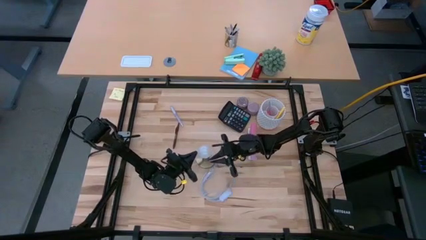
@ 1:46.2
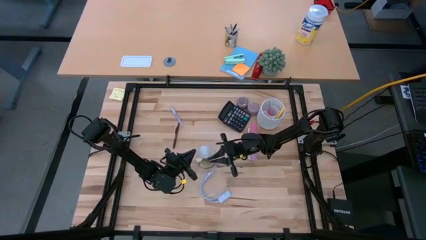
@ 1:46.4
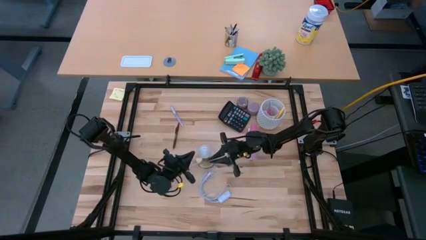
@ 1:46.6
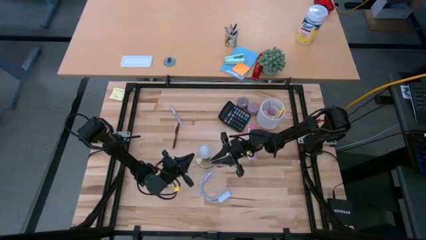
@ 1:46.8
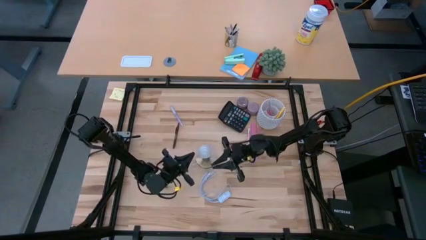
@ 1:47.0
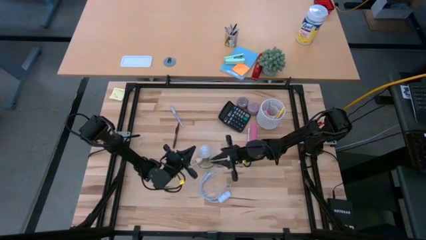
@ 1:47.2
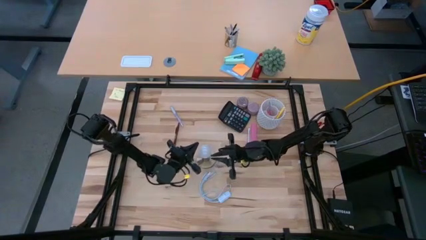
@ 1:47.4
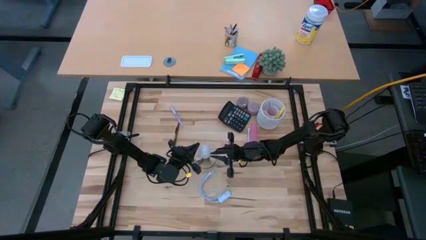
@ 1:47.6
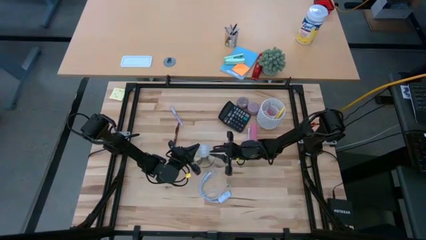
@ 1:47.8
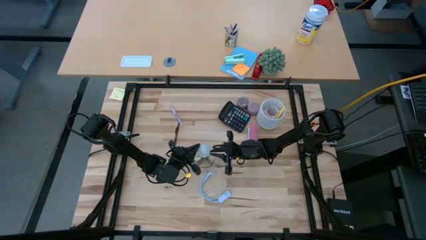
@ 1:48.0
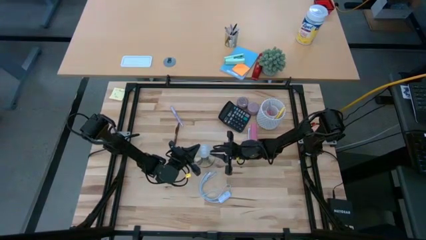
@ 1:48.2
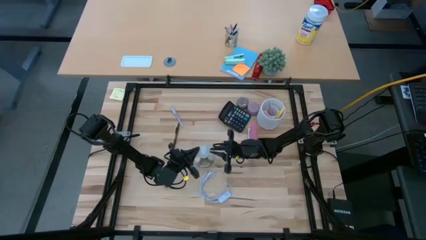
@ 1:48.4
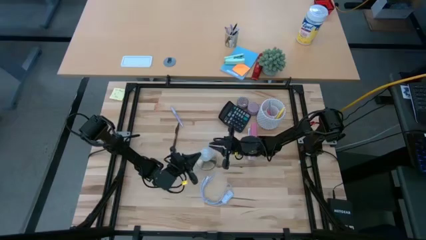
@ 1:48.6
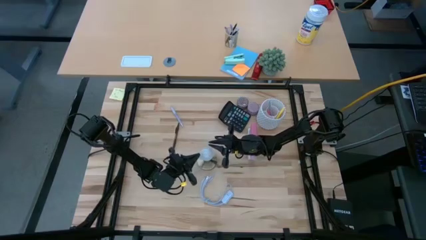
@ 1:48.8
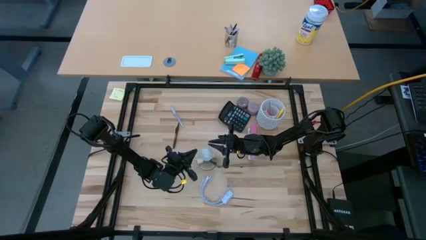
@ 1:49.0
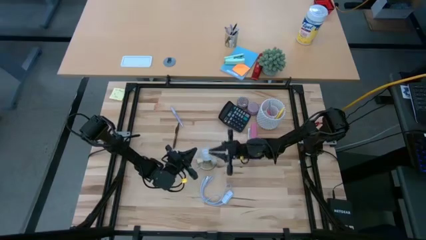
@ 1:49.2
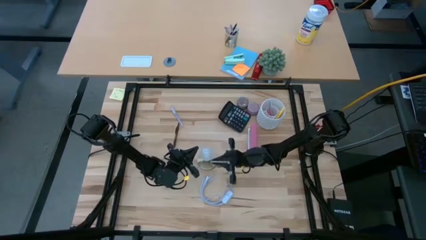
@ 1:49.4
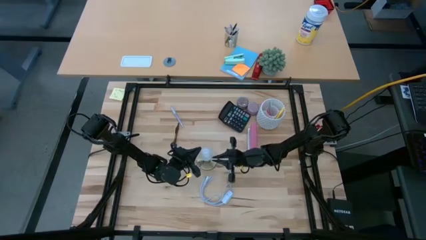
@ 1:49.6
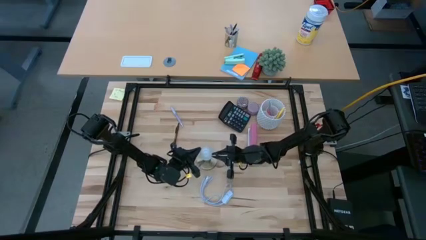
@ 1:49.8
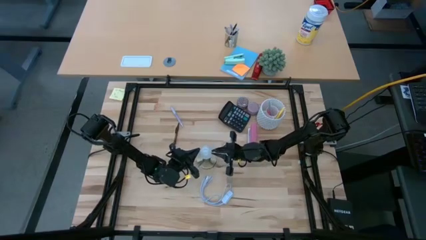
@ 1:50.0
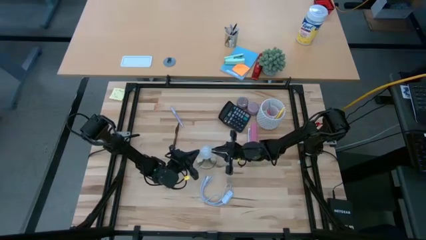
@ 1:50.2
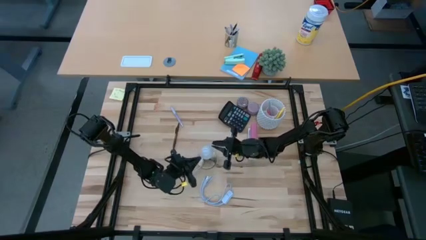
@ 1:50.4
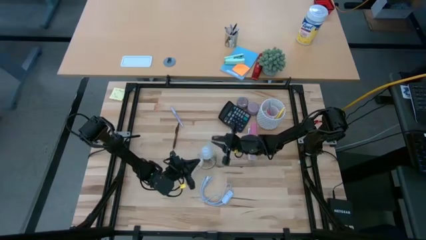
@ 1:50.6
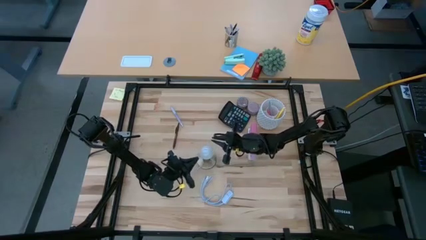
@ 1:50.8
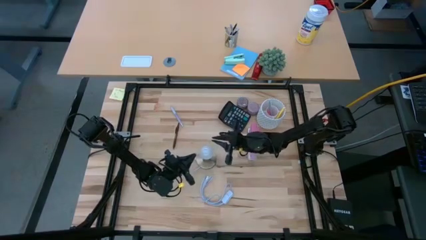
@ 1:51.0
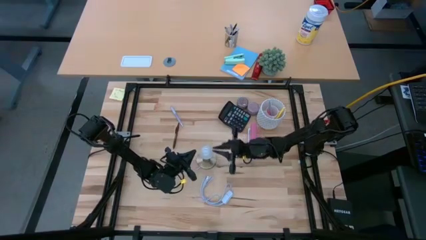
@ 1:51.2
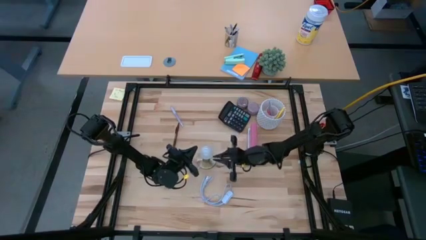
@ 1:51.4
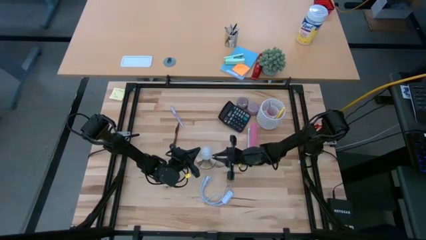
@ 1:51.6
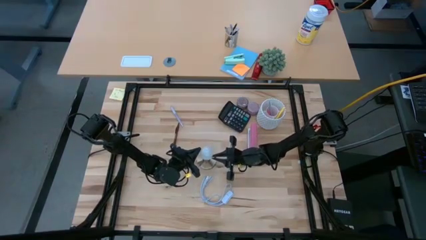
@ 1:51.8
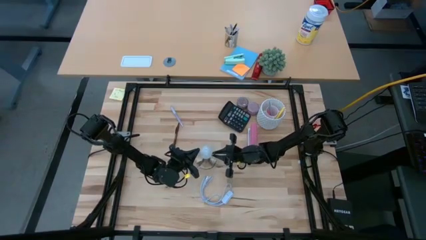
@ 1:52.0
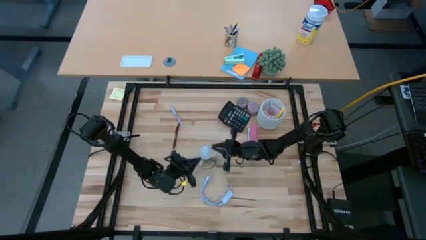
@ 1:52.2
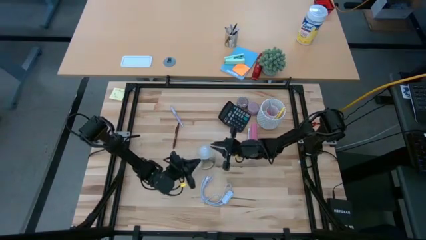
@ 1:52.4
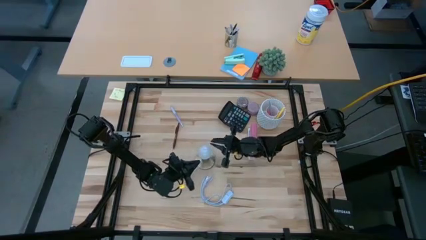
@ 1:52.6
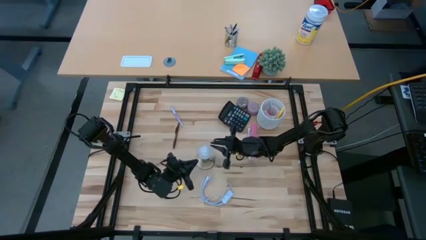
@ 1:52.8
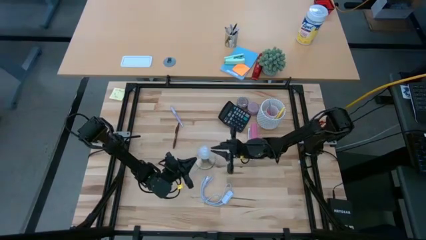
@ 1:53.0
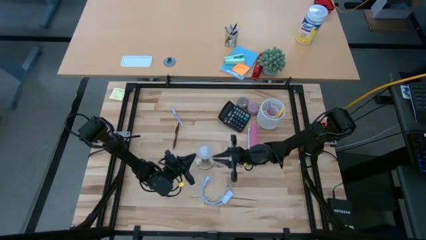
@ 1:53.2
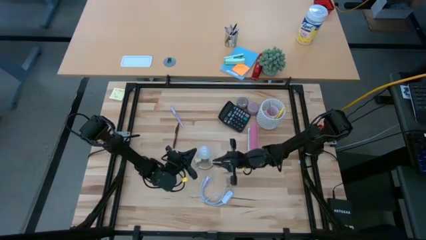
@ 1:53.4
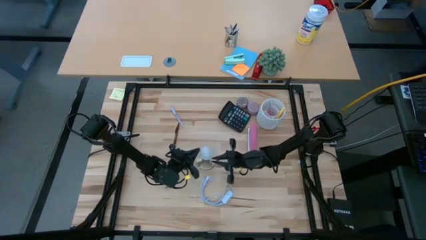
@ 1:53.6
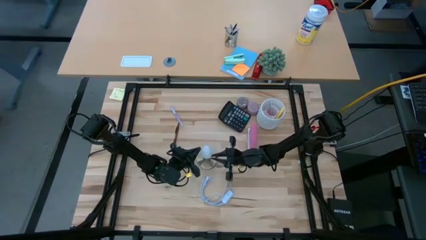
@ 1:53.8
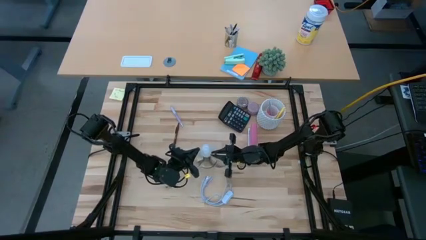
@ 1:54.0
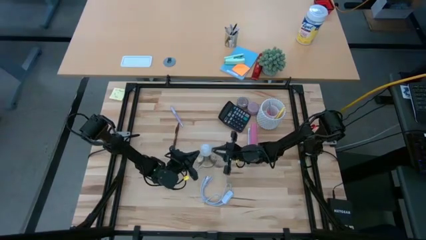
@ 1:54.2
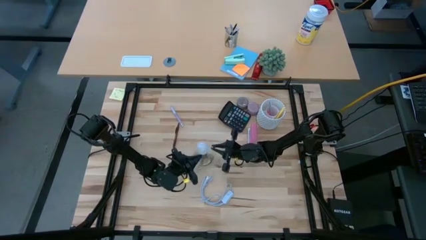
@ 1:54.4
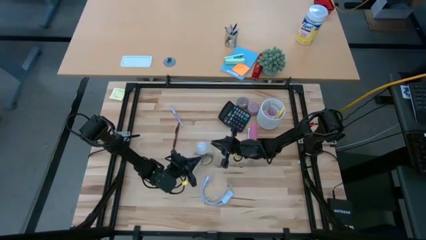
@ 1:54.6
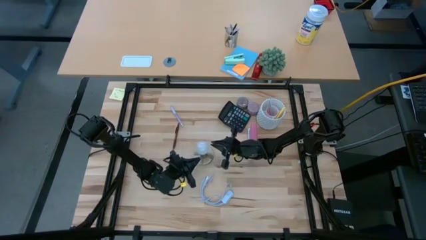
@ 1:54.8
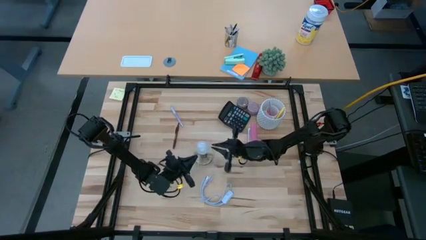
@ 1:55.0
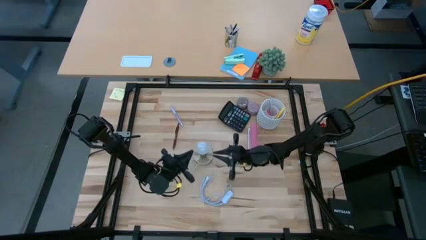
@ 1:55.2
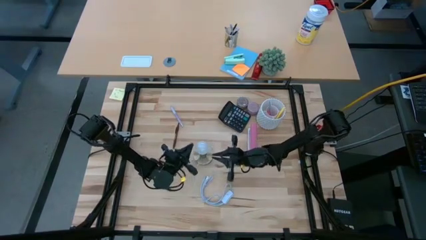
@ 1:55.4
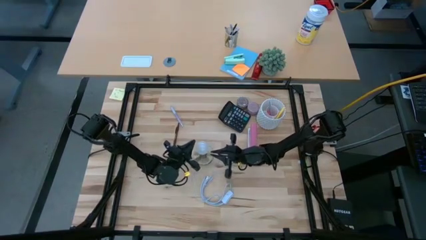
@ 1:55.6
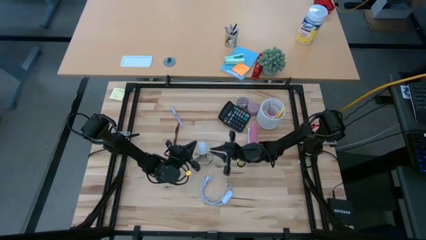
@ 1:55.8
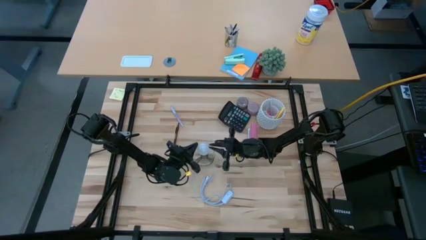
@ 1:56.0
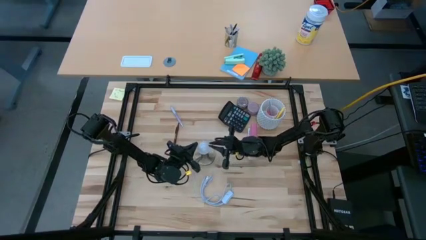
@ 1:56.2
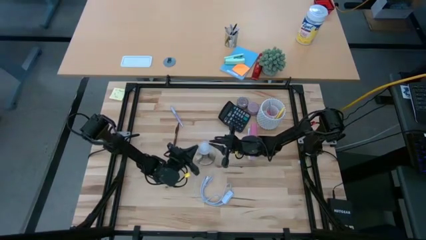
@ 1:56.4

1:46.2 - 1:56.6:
Task: Screw lightbulb
Remove the lightbulb from the gold lamp
